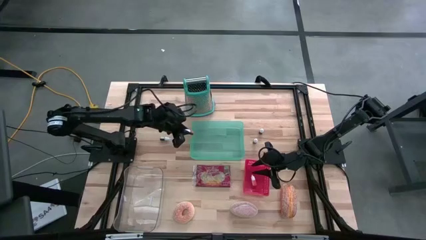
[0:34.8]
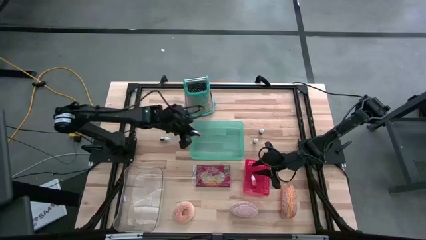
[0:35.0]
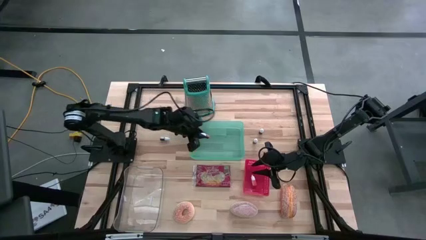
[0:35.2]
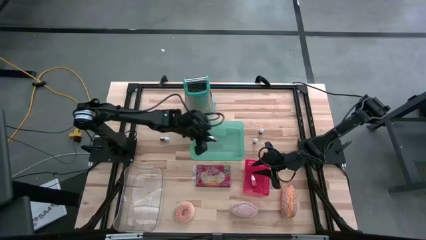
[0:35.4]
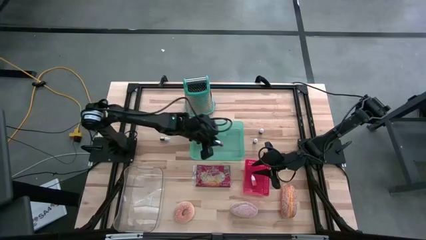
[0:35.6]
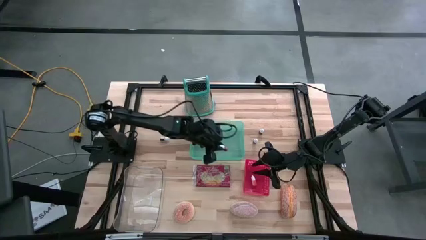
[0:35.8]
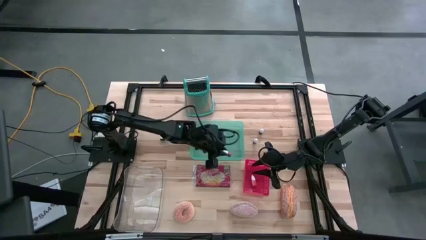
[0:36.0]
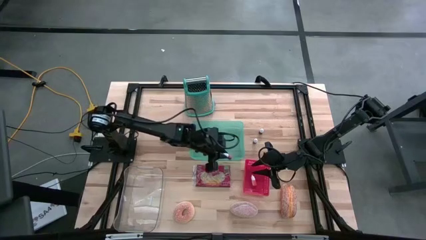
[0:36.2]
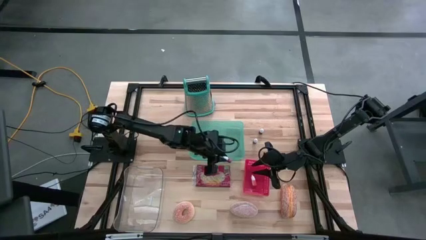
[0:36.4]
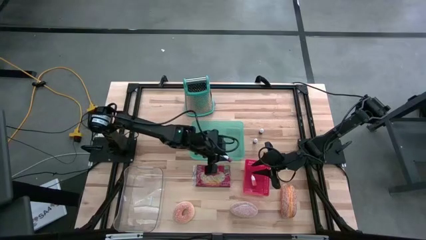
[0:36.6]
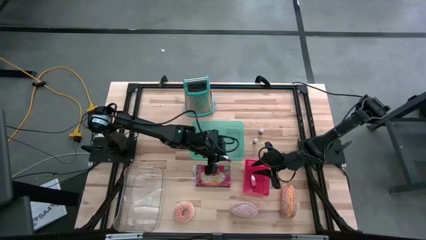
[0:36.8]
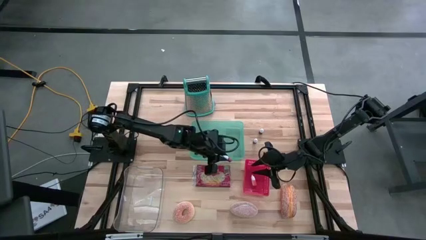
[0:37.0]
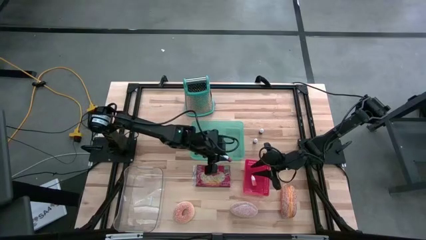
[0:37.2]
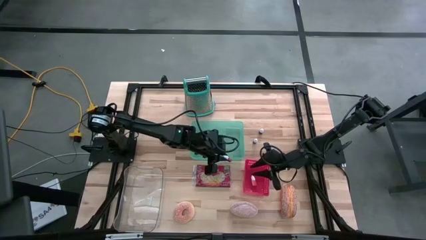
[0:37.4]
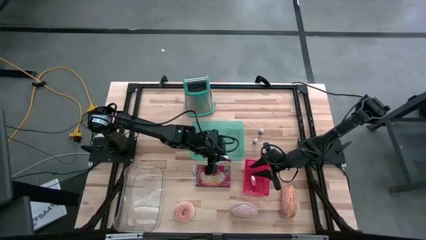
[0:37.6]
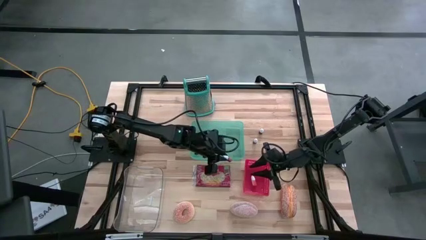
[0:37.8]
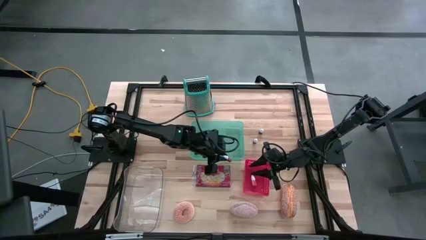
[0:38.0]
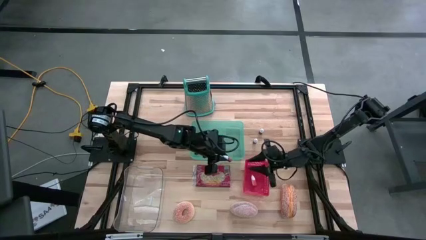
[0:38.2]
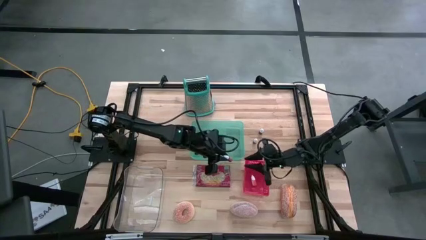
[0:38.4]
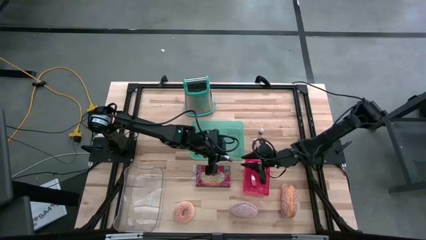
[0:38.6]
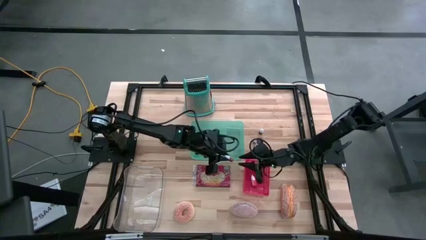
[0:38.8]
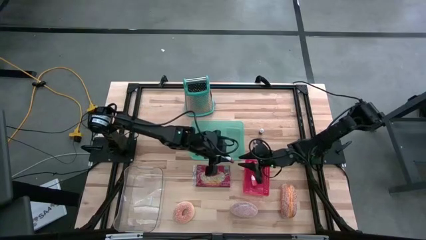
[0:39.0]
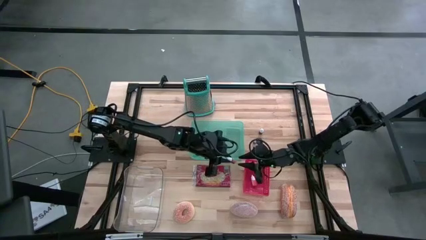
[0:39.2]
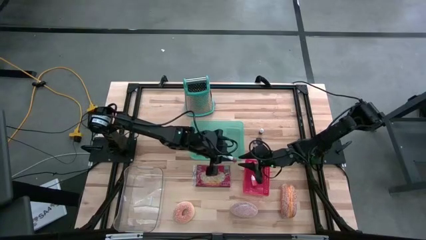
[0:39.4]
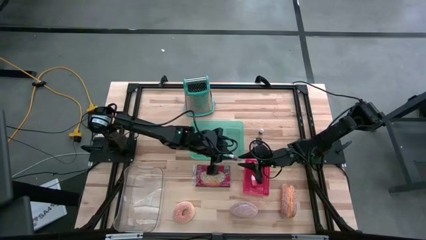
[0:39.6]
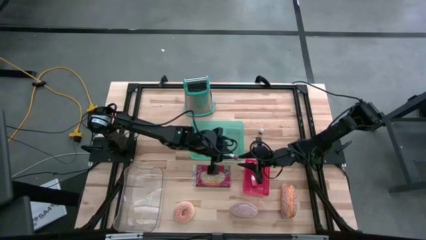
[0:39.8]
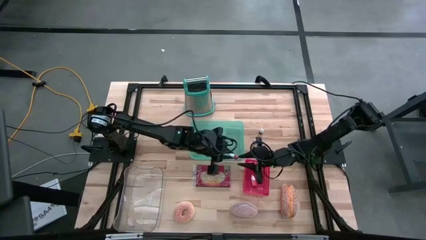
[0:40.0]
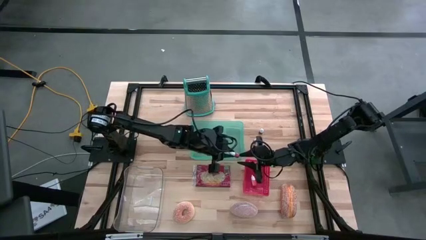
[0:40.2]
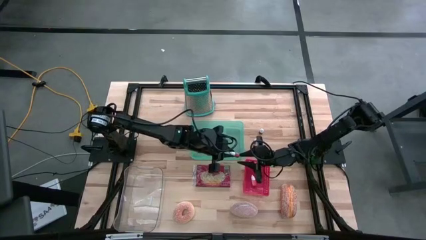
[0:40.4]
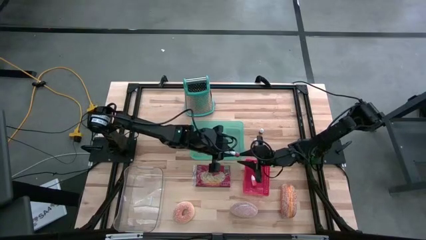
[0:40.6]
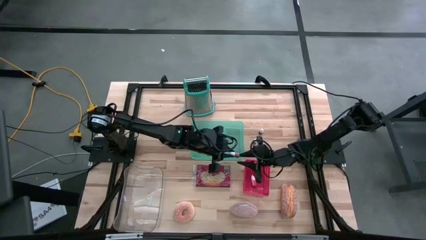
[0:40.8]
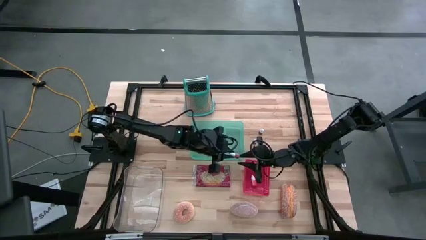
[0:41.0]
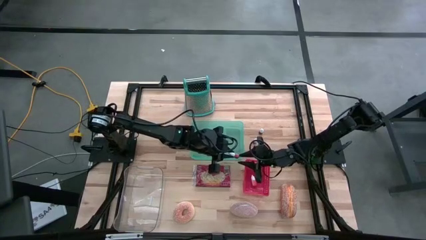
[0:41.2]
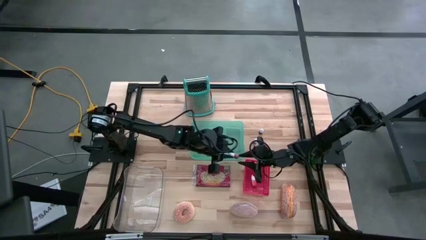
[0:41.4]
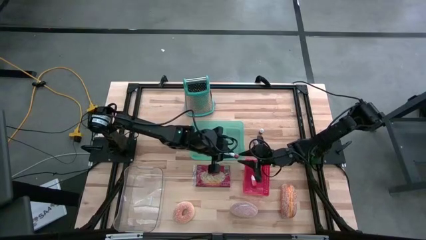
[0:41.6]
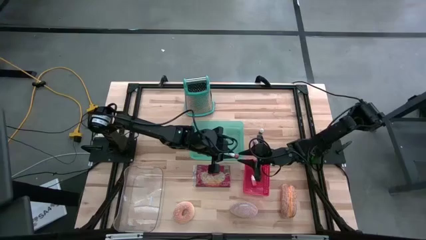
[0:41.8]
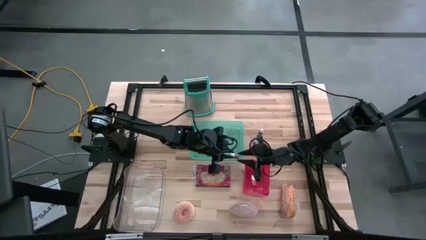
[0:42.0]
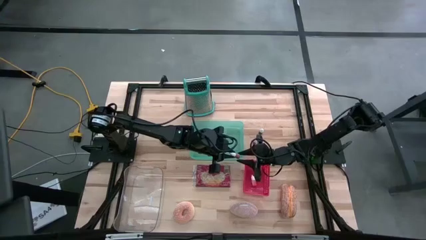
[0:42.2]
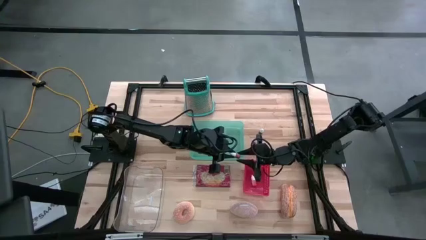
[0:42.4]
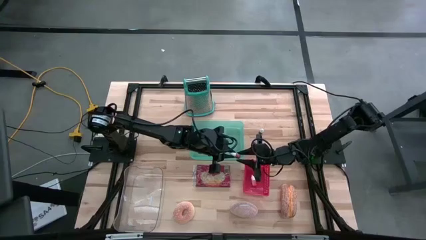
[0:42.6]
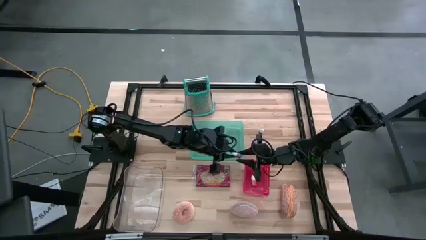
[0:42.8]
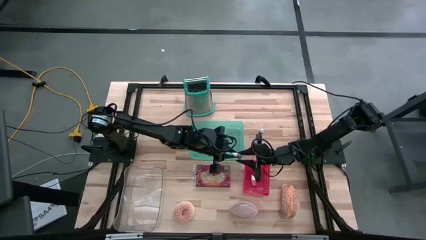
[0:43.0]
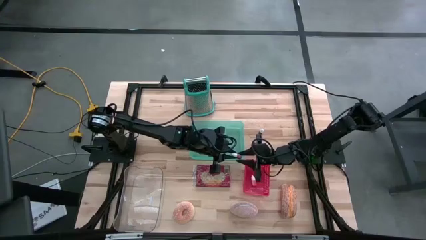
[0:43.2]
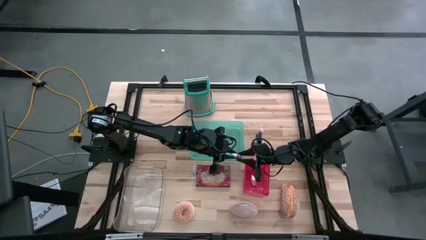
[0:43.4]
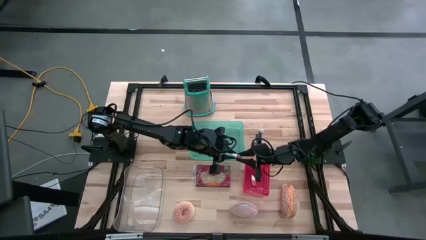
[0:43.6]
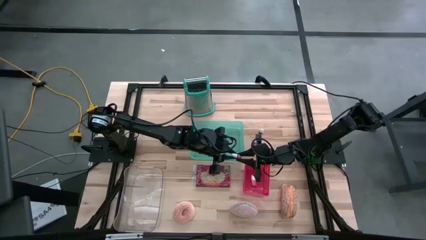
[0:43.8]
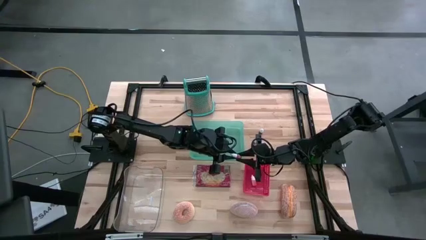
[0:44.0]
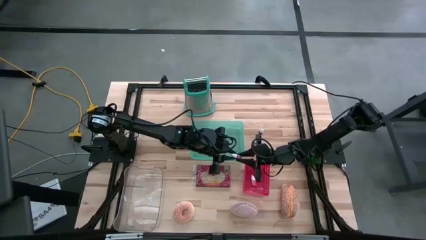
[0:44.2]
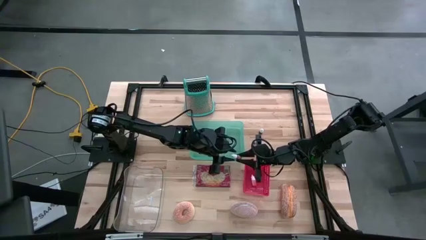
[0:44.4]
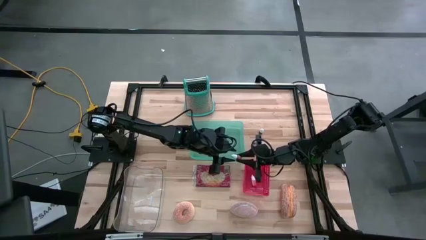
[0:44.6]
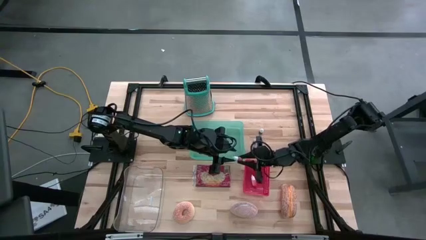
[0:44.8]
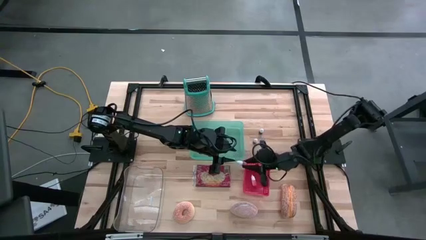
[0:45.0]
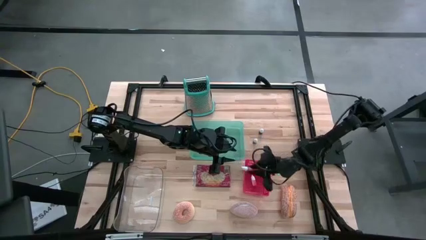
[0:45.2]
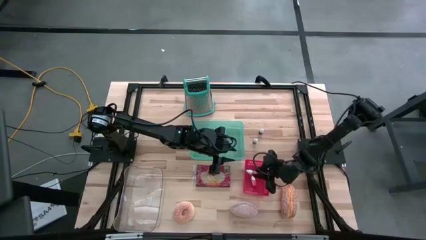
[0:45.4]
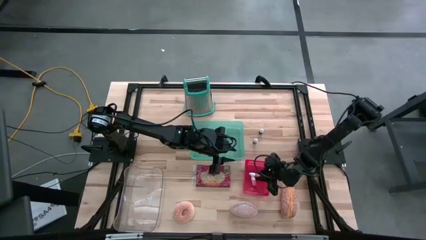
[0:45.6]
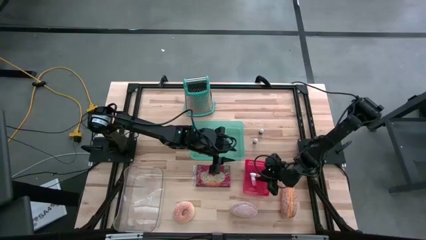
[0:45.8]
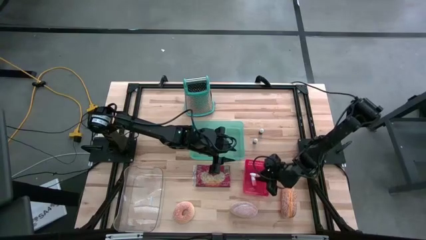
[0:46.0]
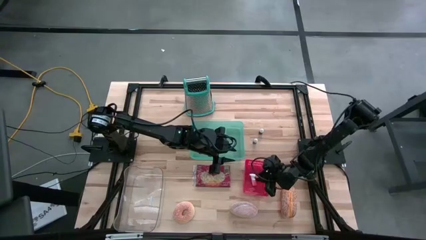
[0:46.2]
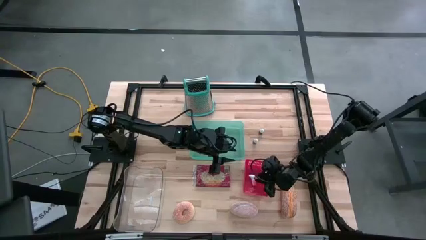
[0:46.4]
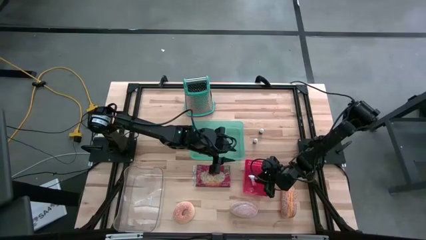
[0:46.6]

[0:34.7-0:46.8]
Task: Pick & Place Food Item
Put the yellow food coloring bottle into the red bin

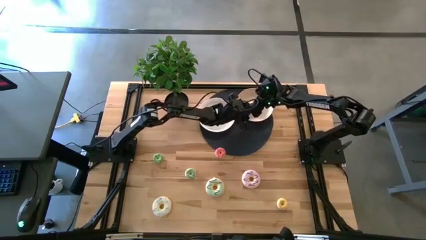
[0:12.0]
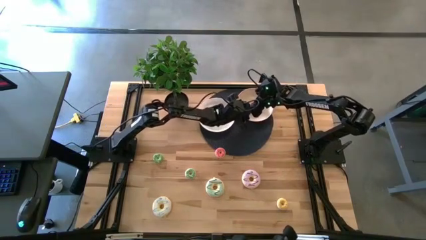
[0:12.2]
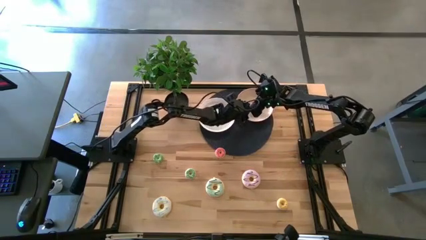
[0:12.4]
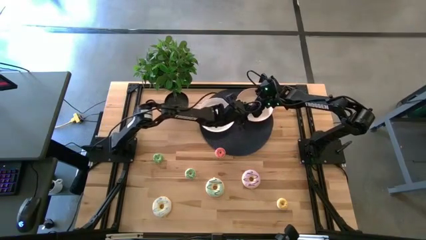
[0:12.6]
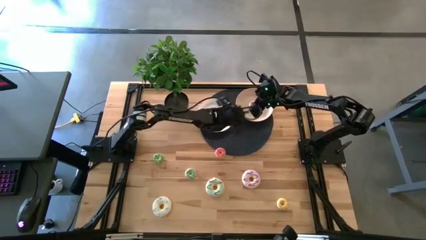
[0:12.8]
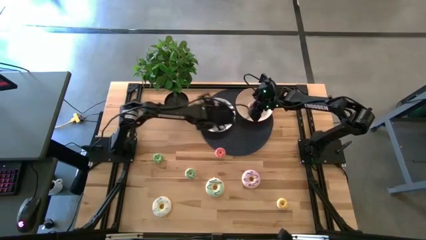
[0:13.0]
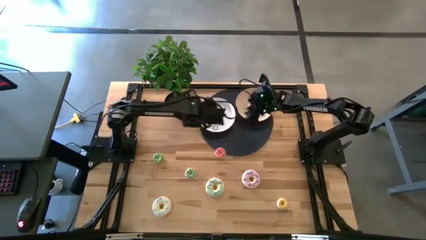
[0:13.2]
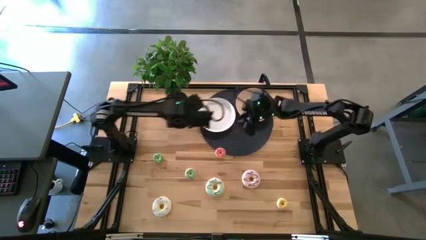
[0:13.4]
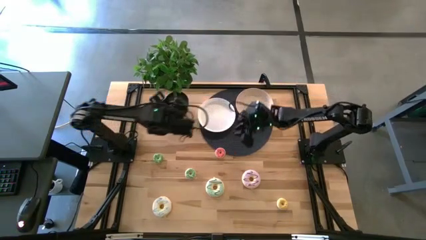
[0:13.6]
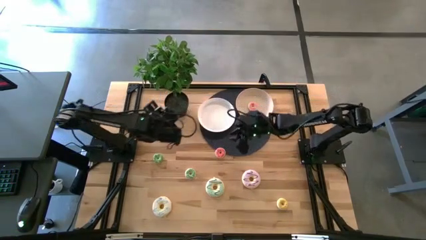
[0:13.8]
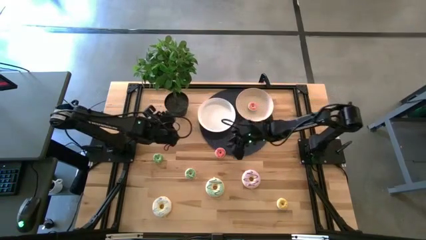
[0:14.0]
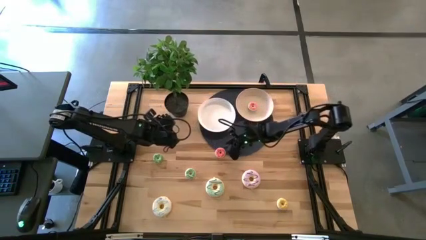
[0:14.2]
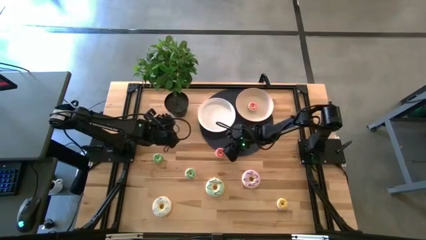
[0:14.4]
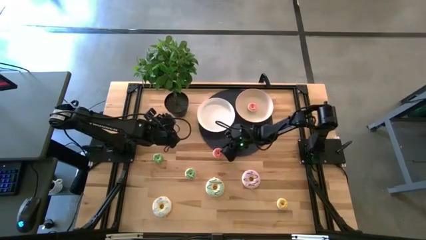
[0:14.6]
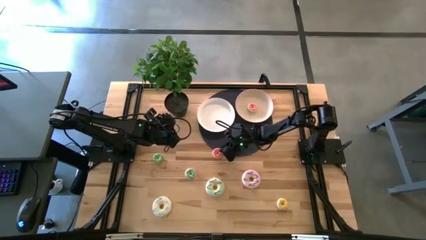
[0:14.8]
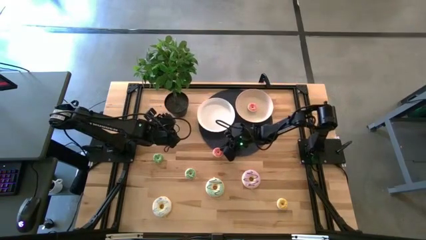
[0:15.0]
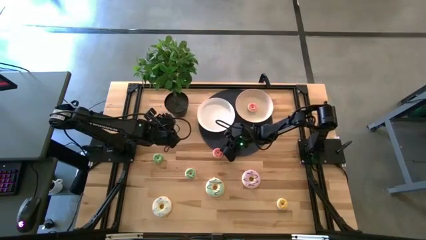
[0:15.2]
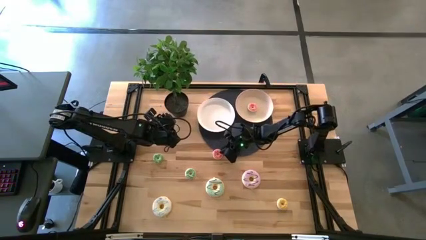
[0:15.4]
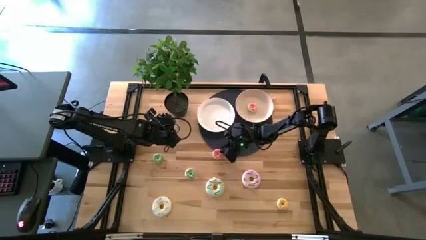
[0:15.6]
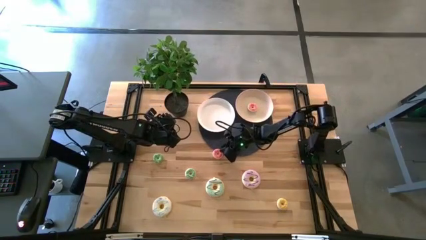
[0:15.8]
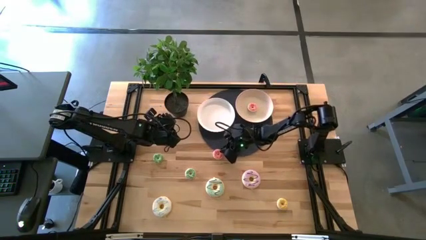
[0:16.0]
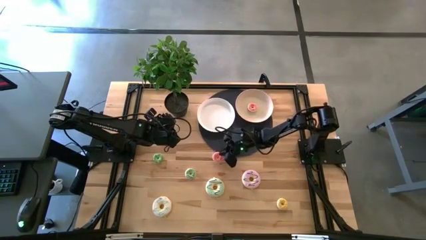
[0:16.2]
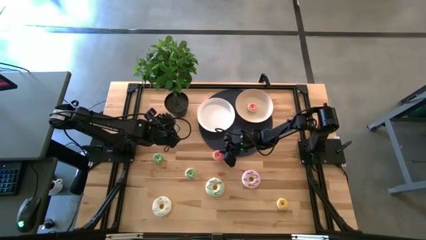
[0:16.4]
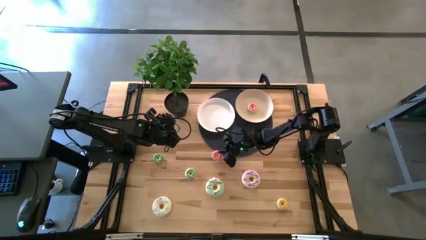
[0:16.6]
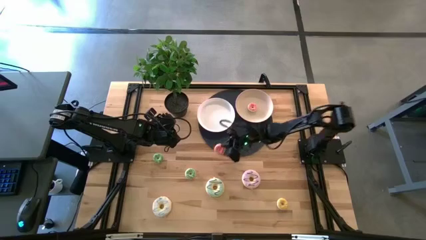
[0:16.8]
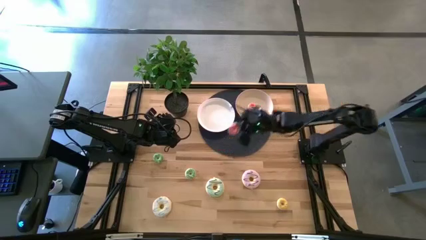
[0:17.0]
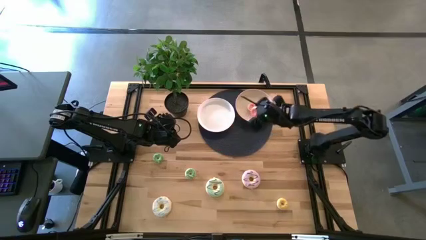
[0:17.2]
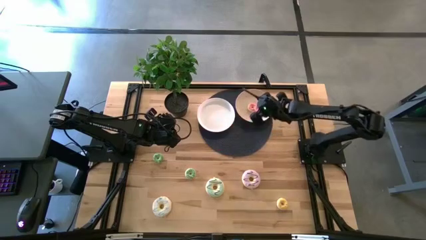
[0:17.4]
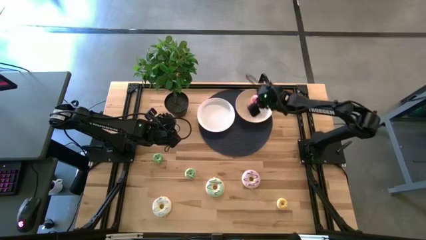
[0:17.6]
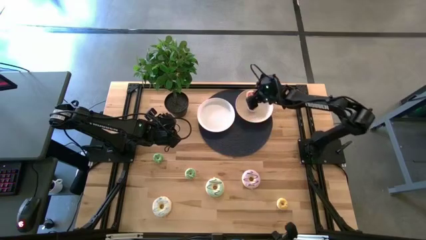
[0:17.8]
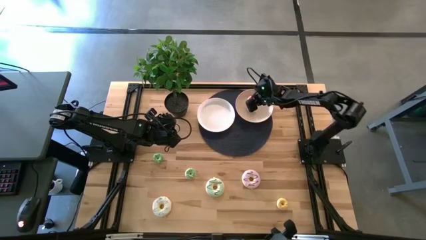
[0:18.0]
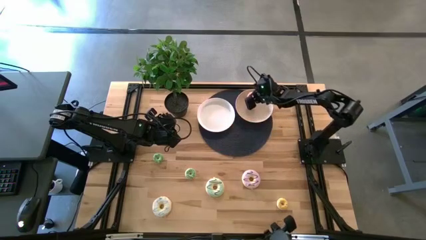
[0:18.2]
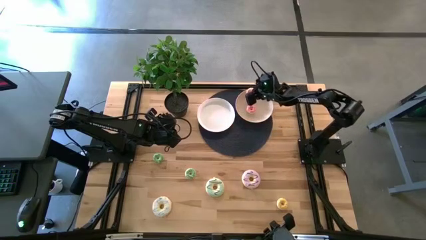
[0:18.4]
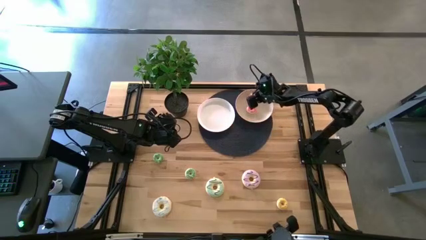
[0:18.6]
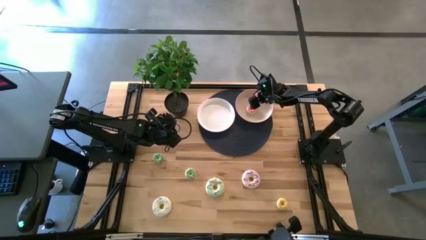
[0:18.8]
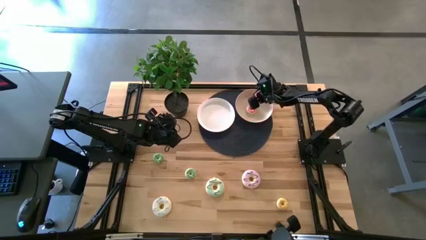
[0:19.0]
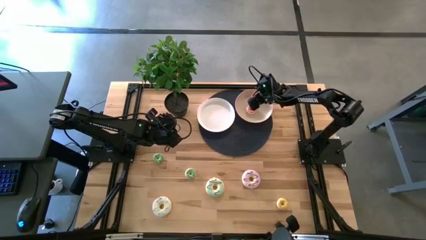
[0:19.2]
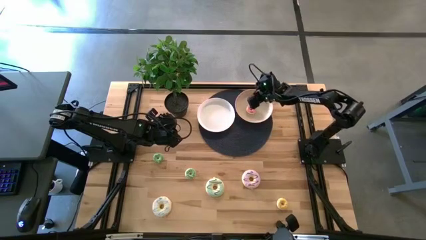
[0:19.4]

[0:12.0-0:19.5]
Task: Pick & Place donuts
Put the small pink donut on the brown plate
